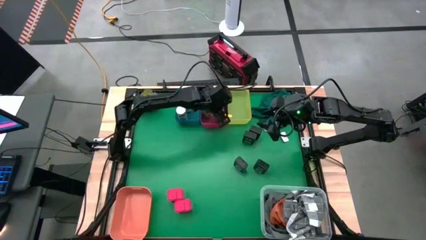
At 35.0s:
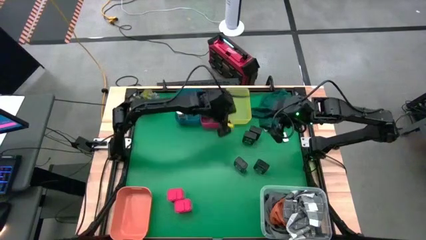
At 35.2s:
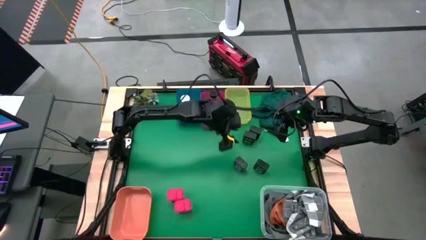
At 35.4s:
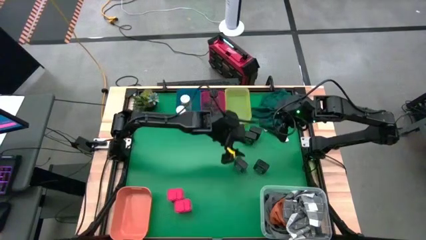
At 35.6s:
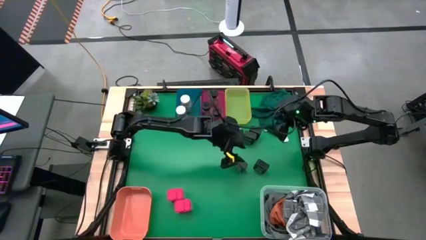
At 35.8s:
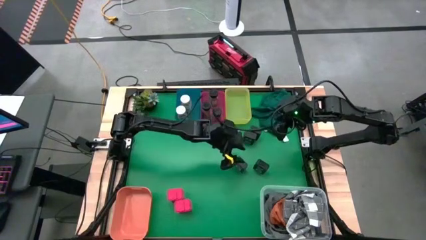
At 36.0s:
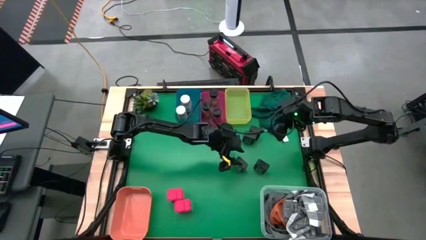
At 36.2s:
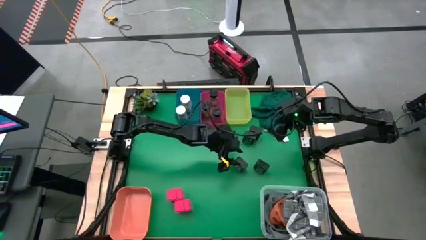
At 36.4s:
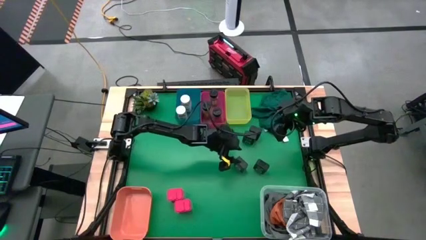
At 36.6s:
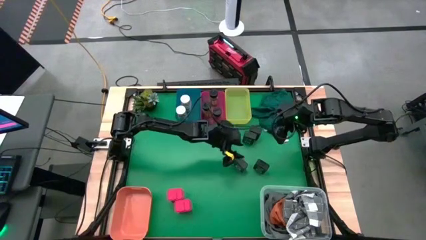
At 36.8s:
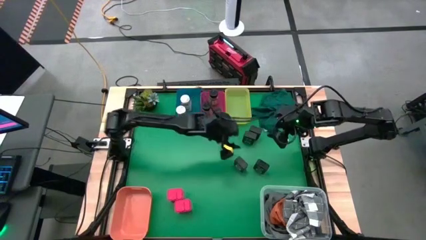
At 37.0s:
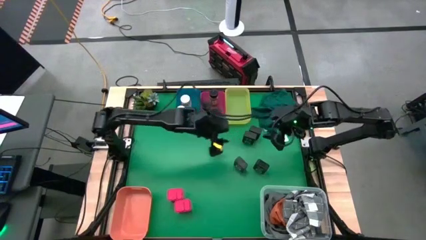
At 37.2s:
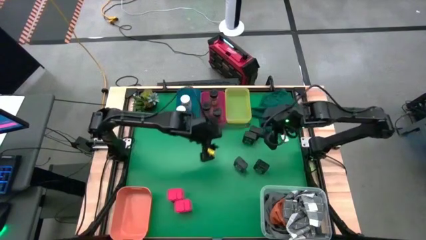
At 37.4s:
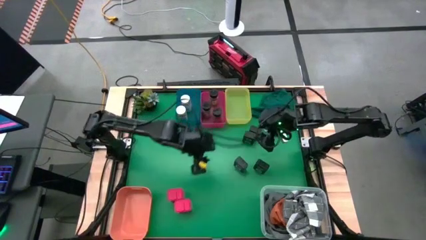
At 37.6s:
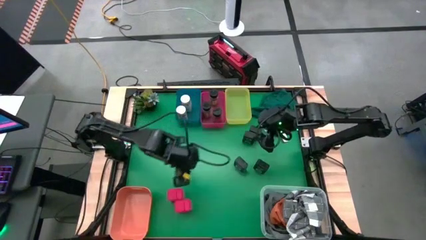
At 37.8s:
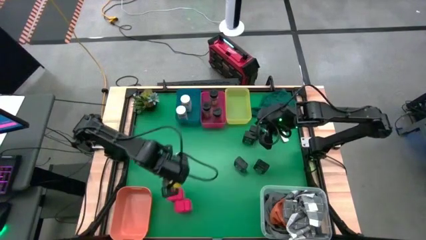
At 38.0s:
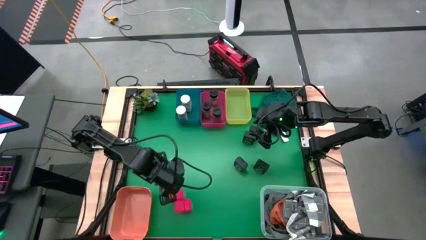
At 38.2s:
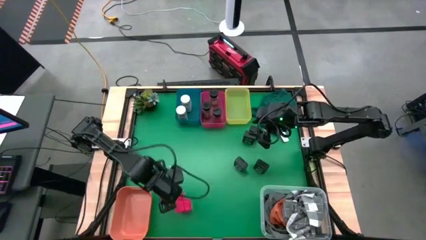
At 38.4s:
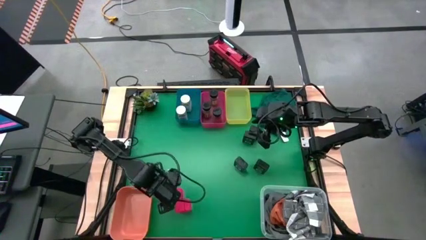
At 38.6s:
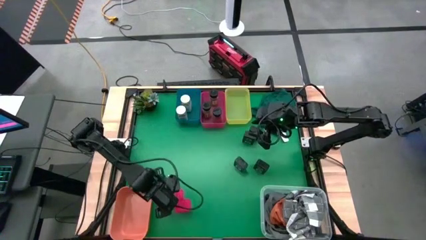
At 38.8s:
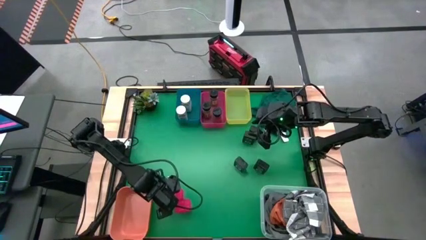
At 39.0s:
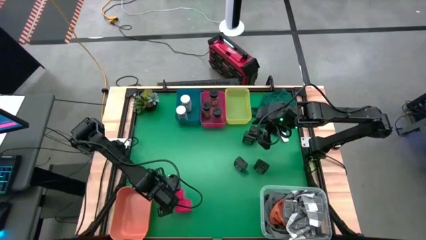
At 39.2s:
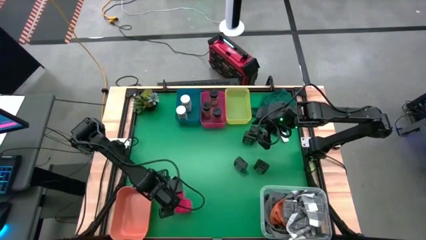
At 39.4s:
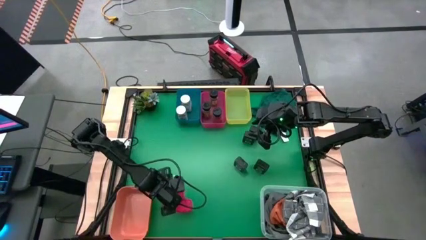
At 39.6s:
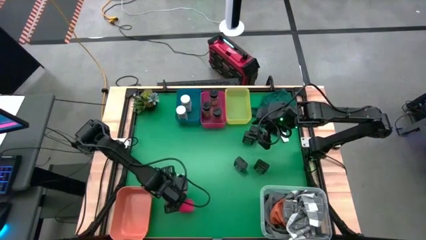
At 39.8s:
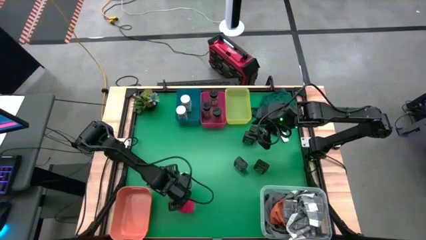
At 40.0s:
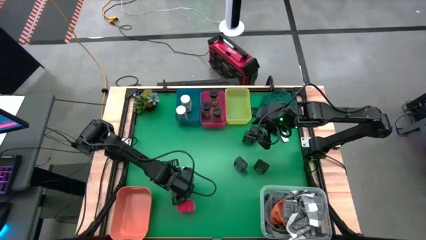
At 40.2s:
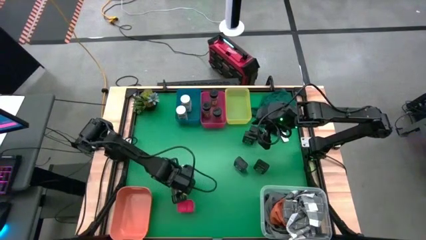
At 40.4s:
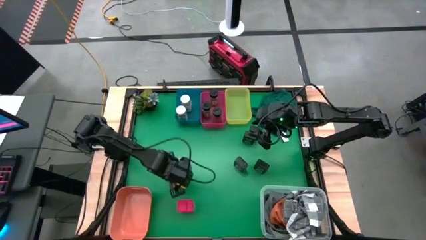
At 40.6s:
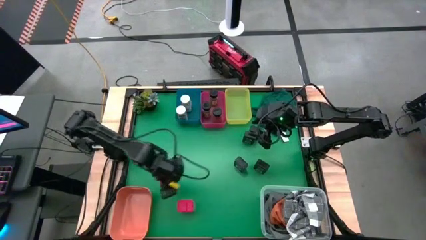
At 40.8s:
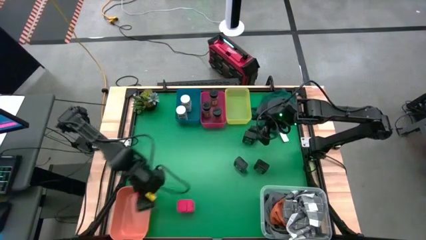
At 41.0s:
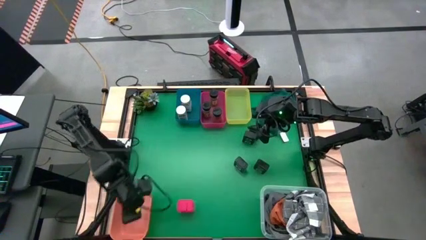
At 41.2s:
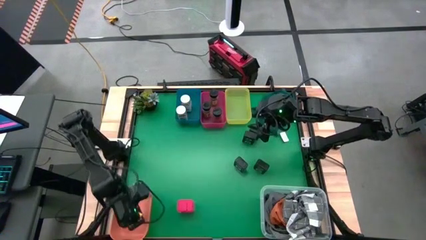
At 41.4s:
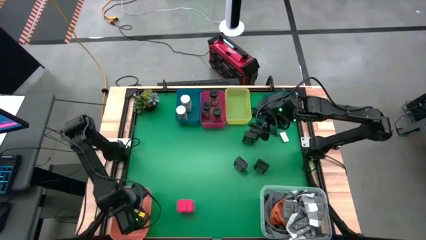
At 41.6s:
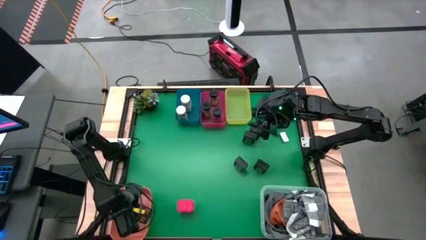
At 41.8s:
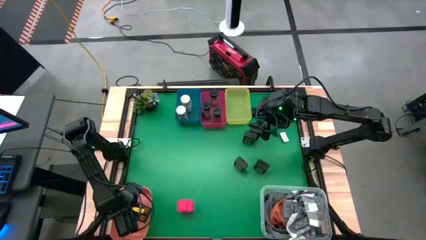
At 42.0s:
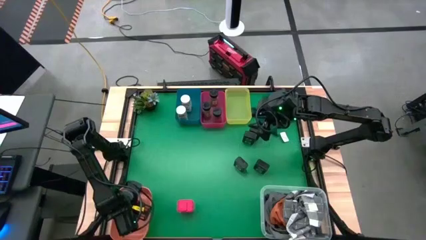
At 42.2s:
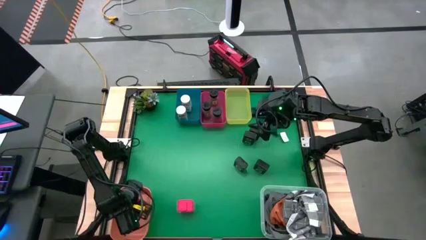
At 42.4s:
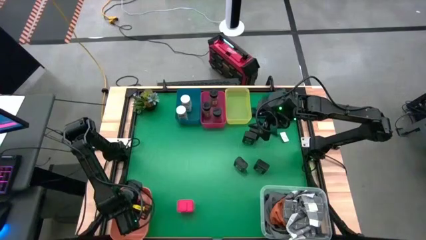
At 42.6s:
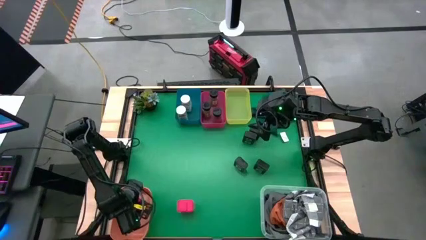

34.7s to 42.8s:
Task: Sort spices by type
Put the top red seasoning can into the orange bin

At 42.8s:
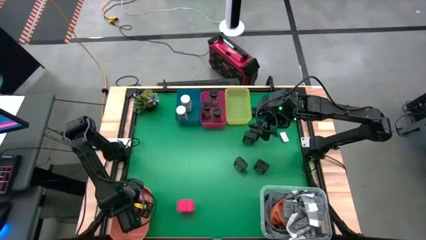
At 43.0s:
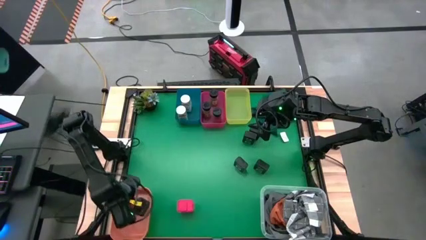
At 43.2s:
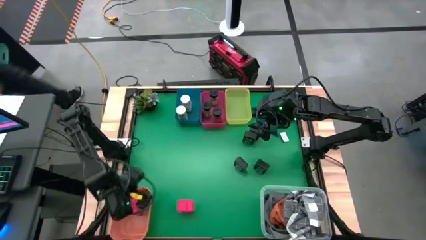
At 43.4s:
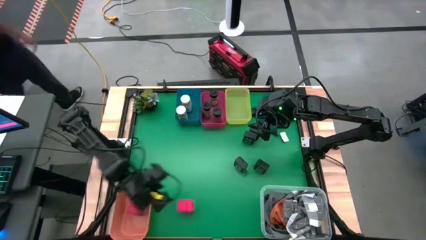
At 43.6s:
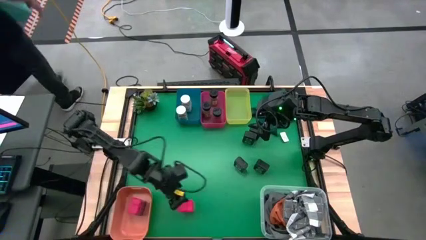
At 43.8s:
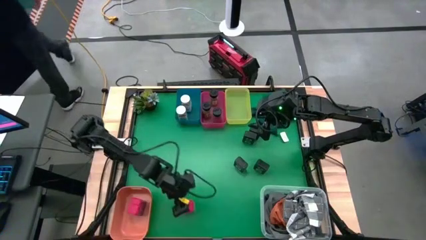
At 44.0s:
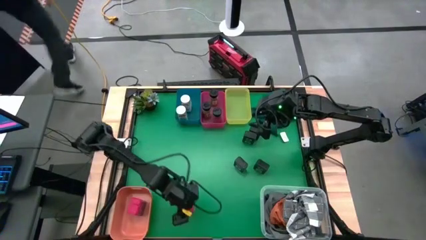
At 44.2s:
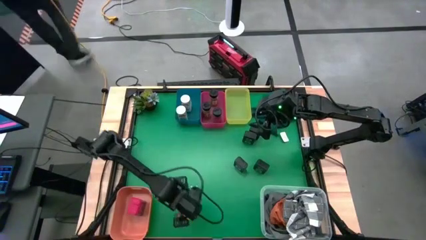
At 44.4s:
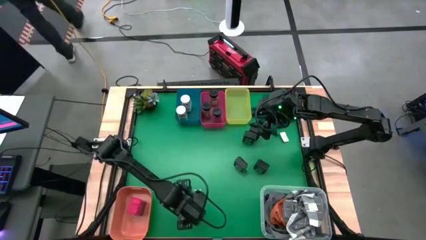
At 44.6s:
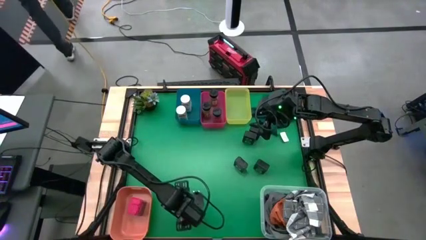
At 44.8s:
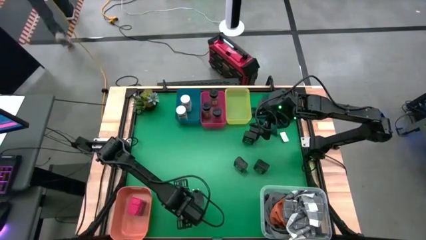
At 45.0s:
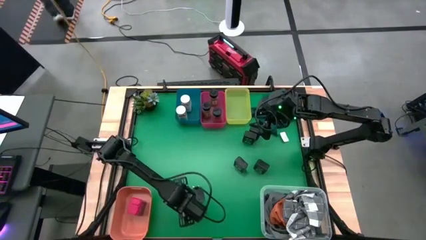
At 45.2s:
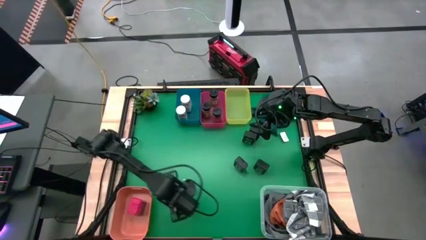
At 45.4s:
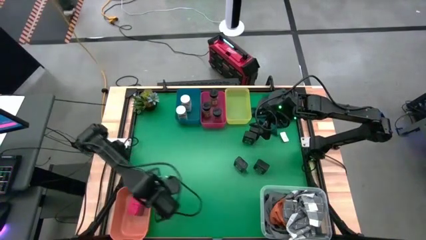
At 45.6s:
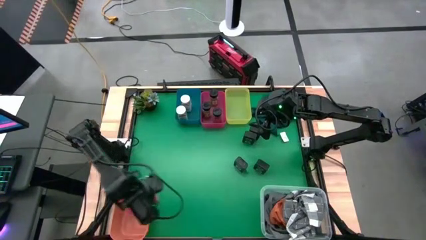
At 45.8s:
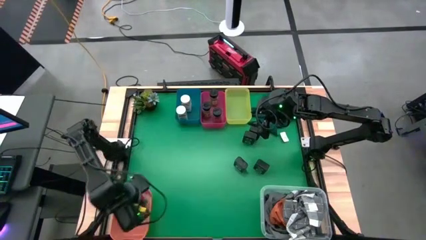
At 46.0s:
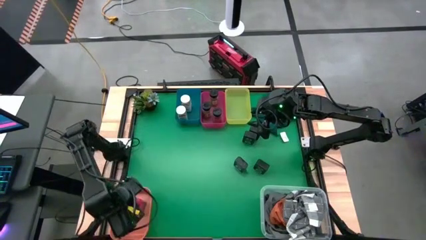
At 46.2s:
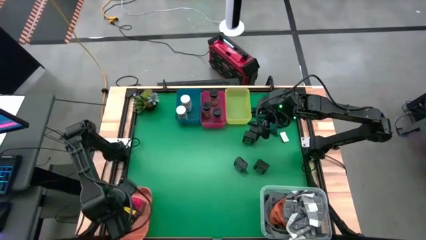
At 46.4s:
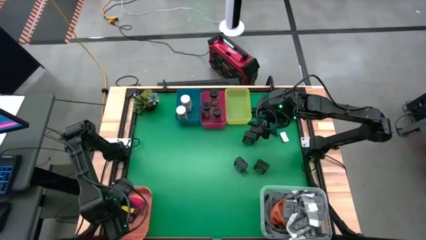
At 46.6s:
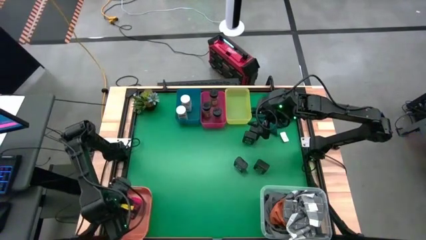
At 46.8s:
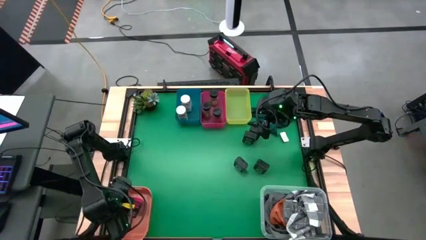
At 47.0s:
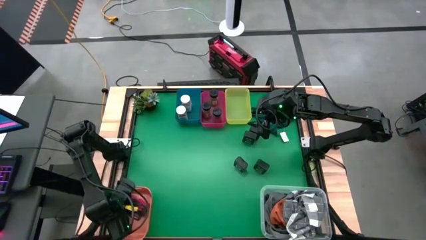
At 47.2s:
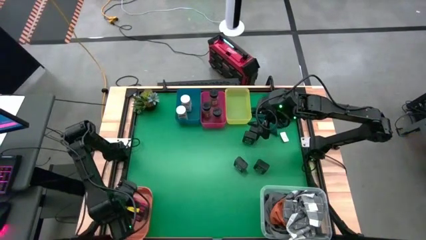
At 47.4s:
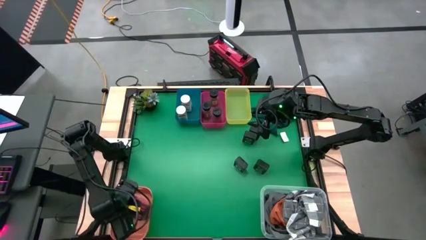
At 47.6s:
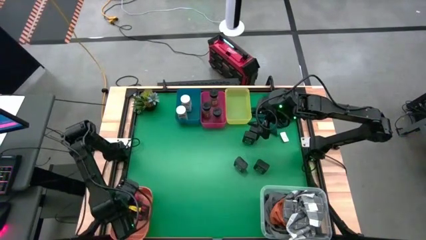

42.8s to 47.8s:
Put the red seasoning can into the orange bin

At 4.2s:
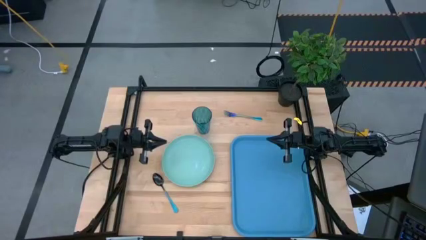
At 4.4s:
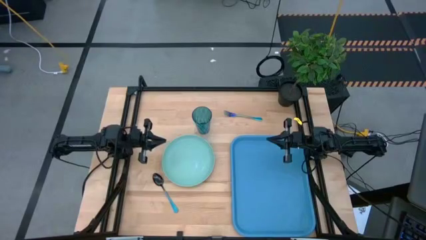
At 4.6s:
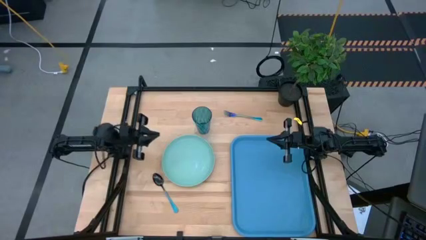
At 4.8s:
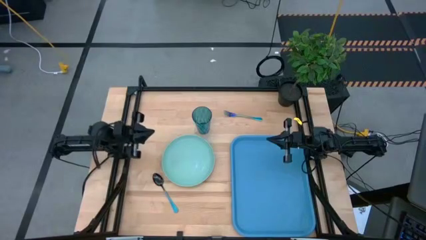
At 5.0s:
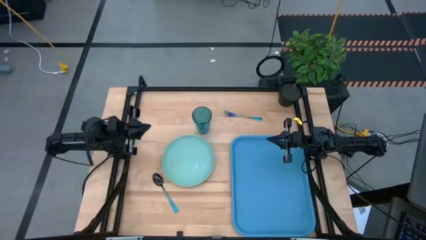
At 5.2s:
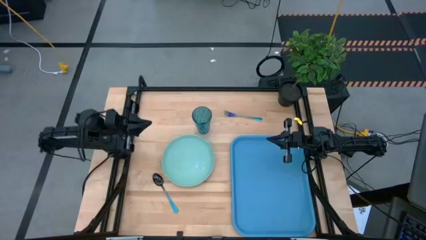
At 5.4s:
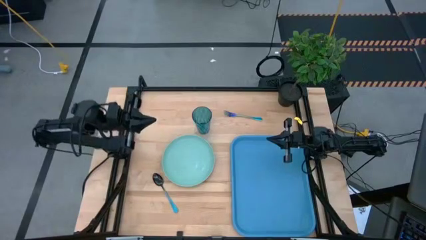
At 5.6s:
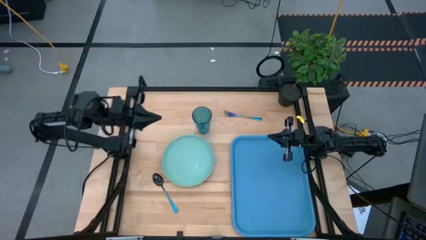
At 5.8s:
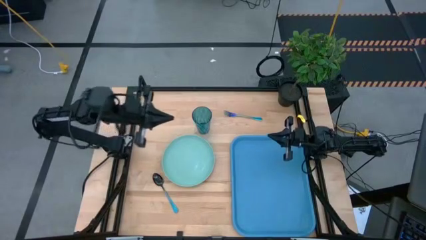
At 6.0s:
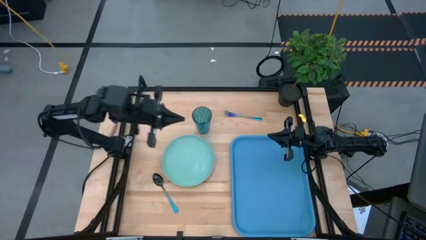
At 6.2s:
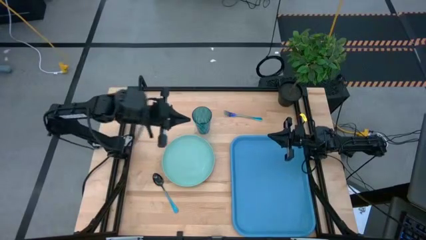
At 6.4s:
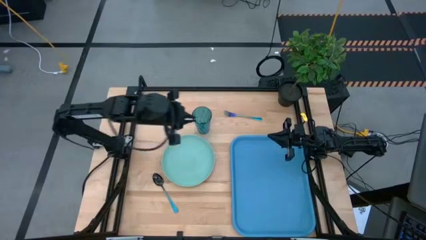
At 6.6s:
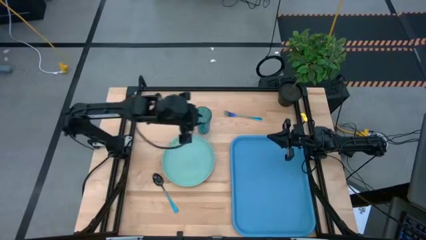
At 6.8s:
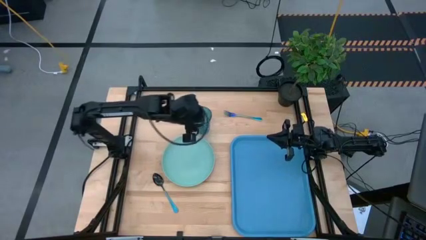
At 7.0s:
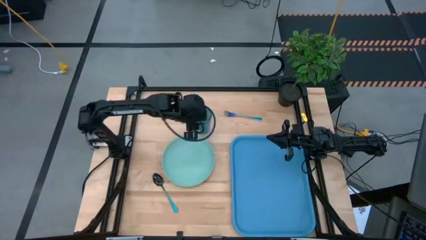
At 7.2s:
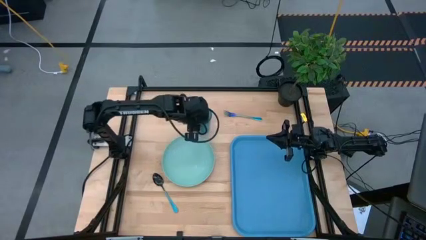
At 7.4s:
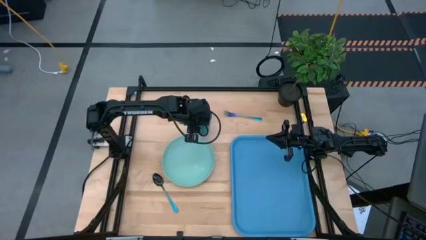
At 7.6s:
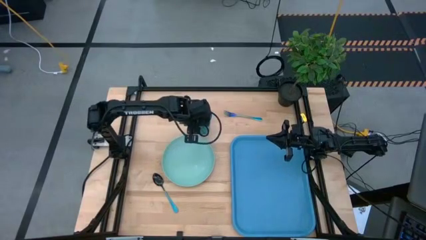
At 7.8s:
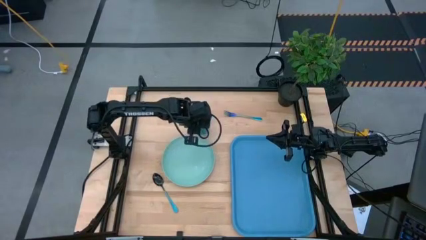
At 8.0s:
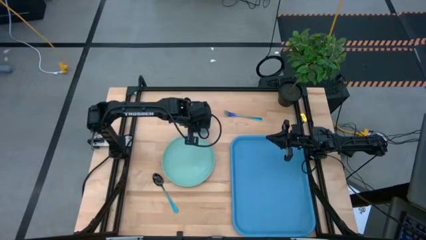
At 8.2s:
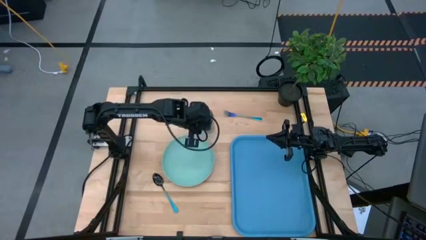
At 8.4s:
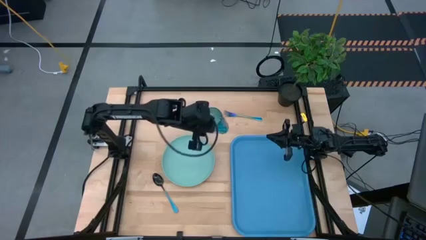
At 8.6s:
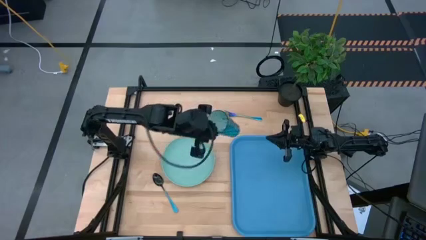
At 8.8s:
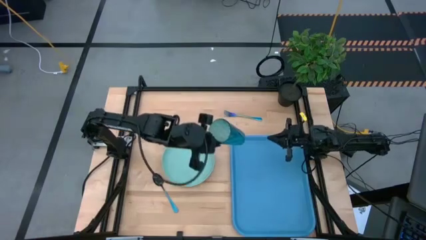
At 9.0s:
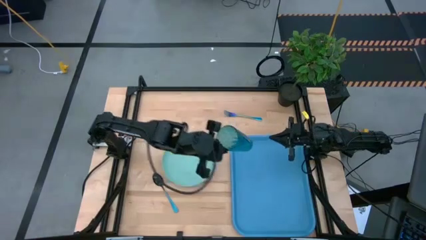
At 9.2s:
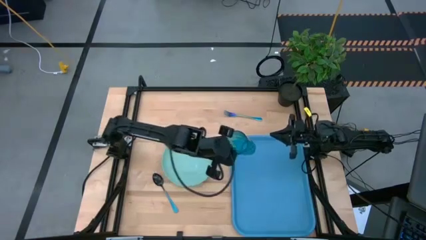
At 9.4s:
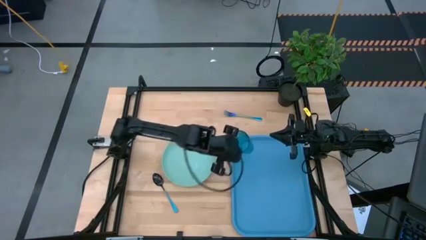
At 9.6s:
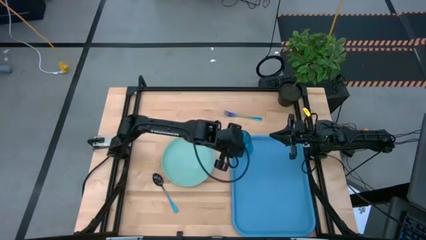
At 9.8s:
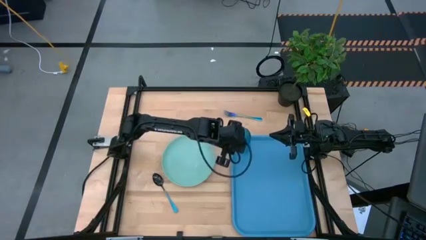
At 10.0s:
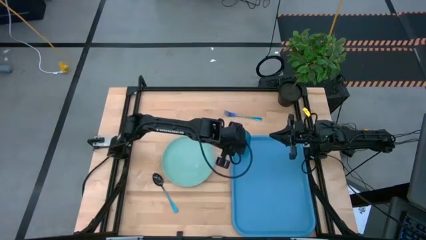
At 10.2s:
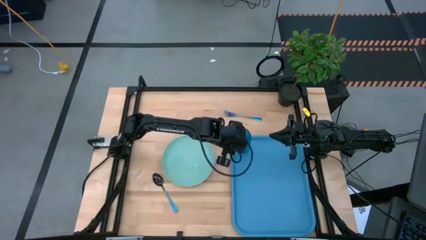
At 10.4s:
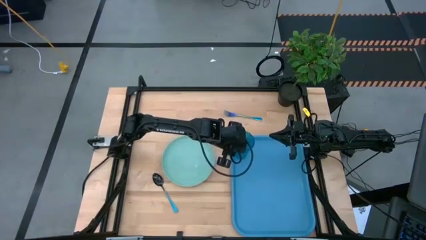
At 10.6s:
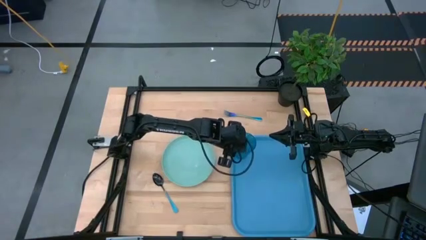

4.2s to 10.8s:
Task: Pick and place plate/cup/fork/spoon on tray
Put the blue glass on the blue serving tray
